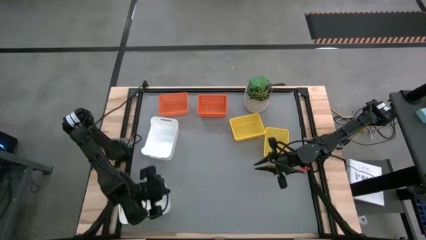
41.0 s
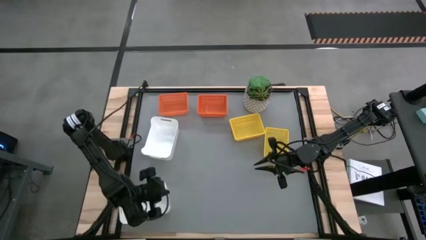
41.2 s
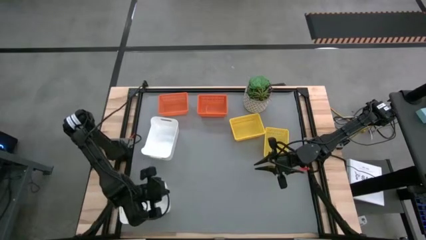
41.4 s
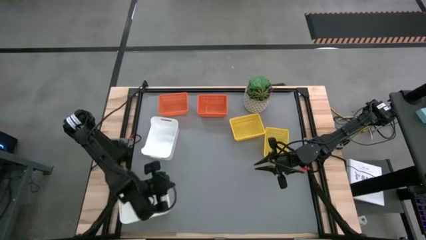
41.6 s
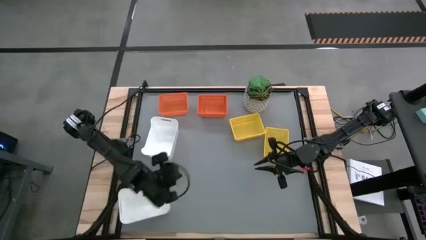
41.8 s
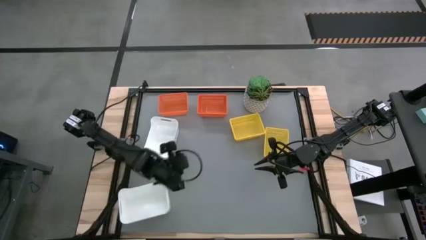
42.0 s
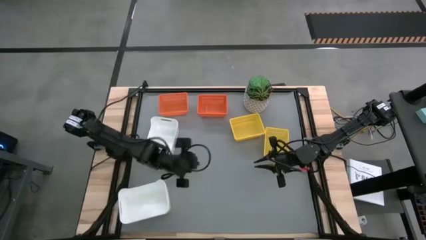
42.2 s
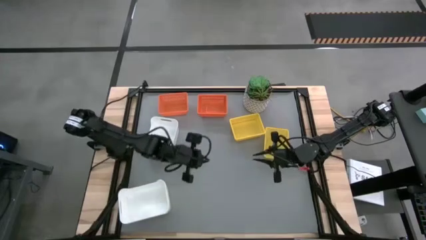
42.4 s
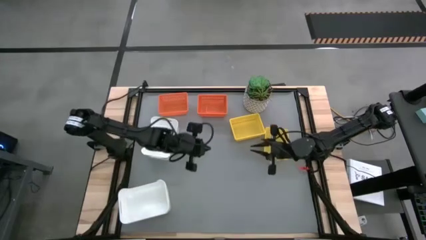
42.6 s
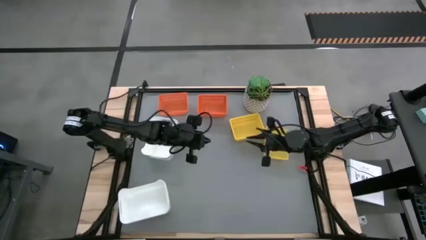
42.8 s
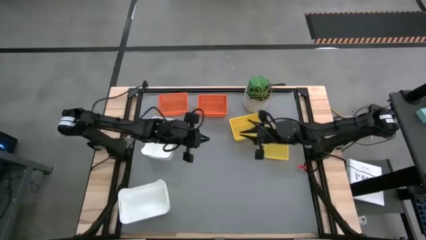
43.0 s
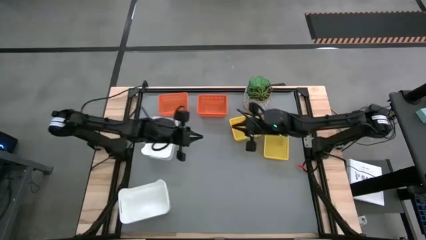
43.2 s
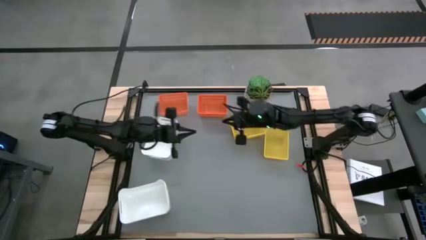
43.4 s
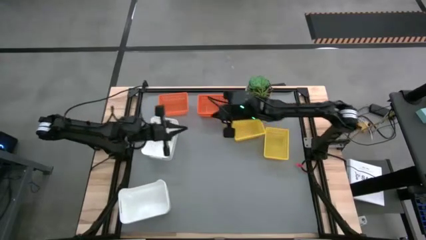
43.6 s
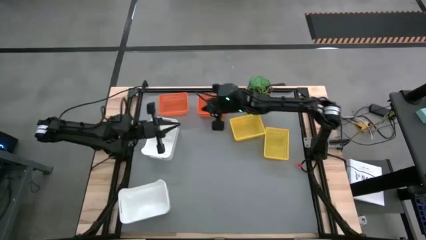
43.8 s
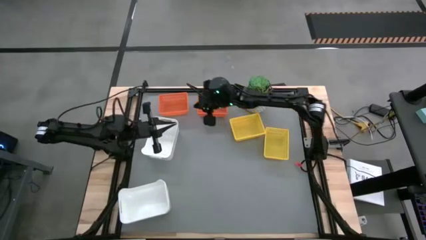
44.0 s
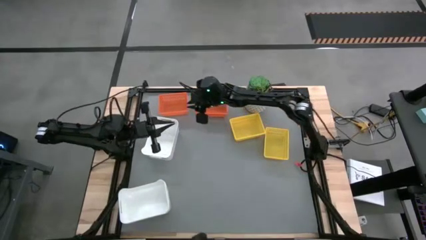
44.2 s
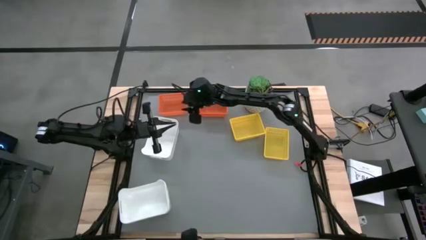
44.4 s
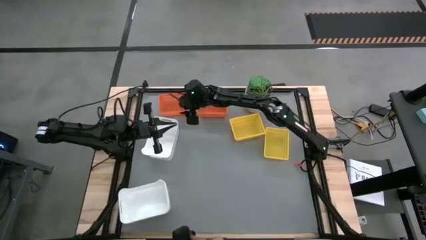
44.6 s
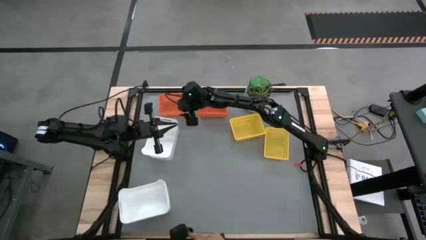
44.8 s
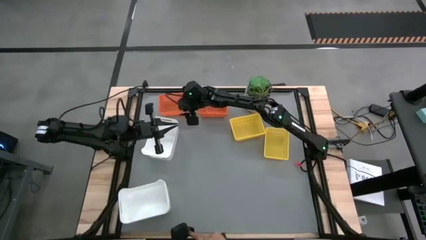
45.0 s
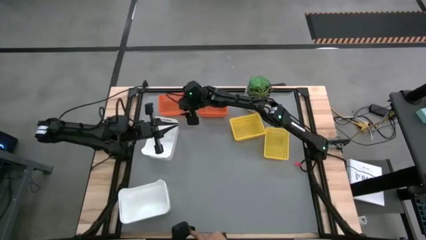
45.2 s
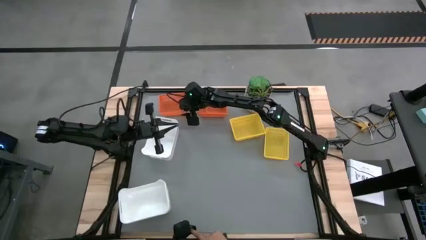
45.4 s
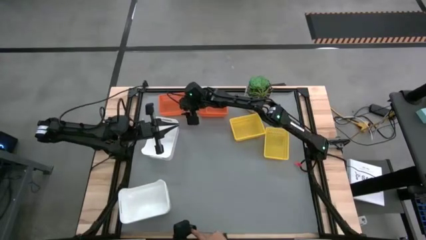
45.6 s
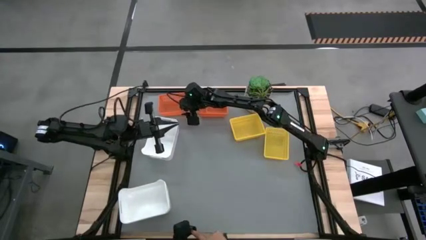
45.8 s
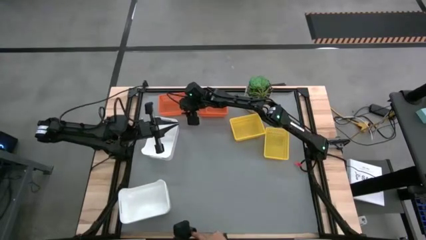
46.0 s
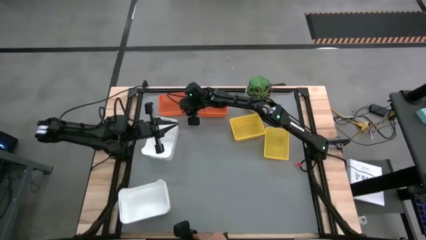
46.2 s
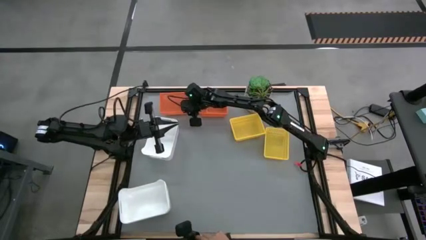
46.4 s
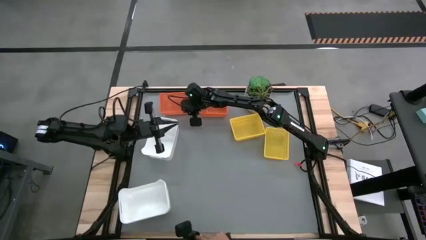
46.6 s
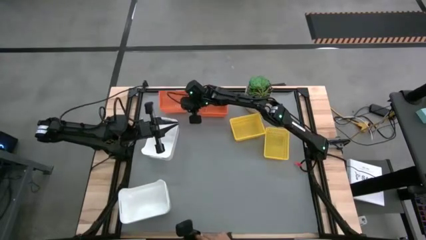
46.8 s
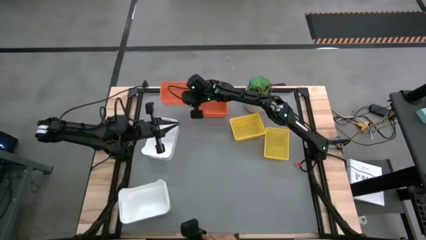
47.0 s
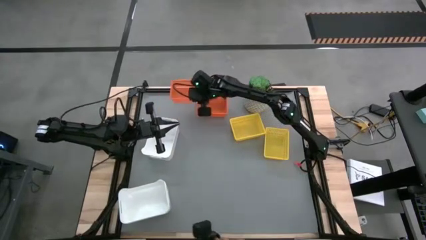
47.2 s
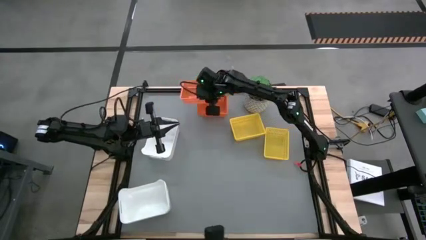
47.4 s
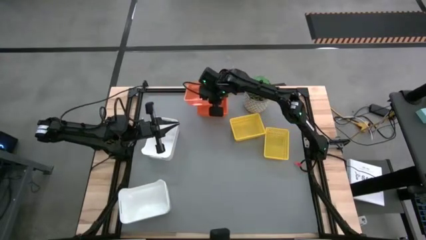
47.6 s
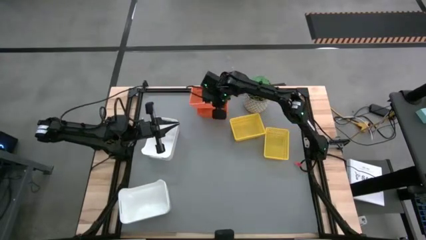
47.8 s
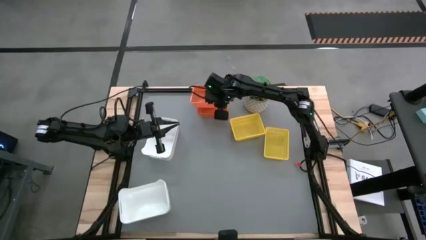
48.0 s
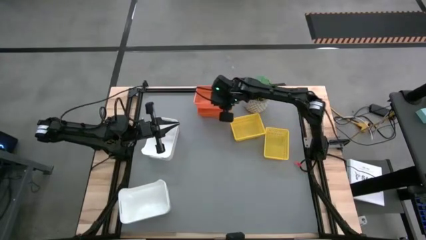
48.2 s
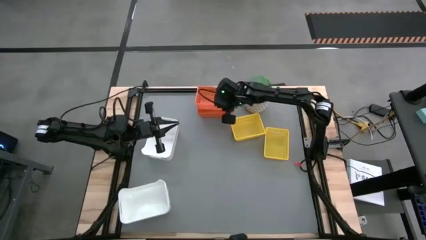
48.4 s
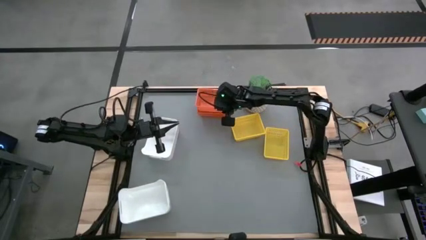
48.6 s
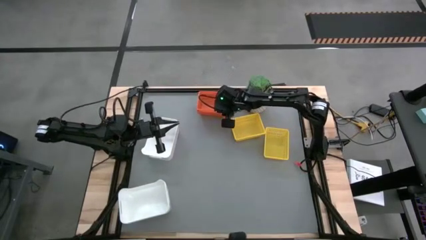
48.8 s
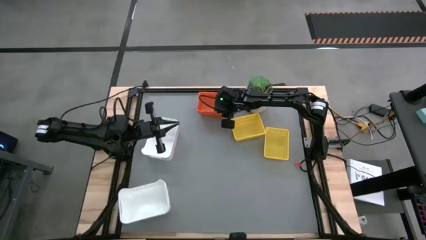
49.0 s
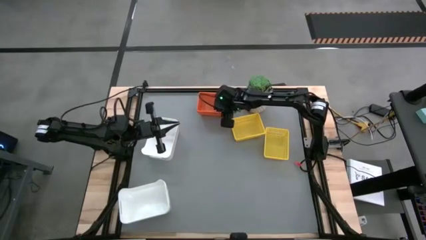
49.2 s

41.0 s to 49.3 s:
Stack the left orange bin on top of the right orange bins

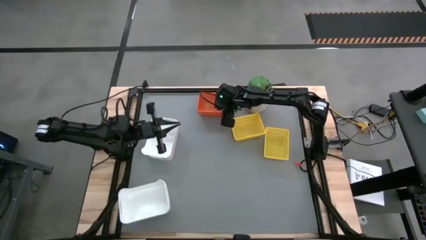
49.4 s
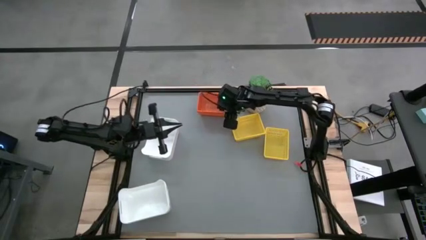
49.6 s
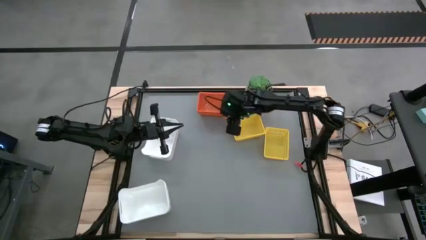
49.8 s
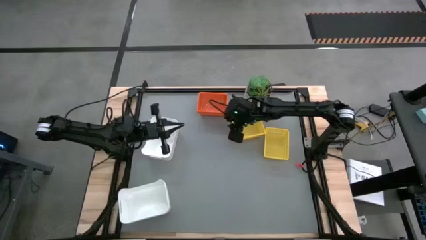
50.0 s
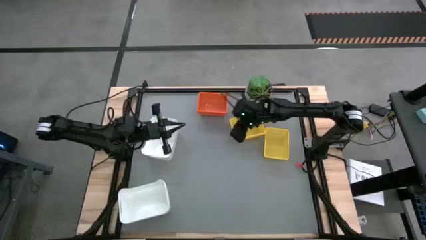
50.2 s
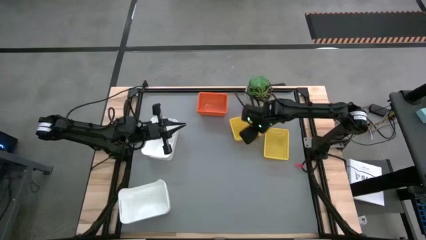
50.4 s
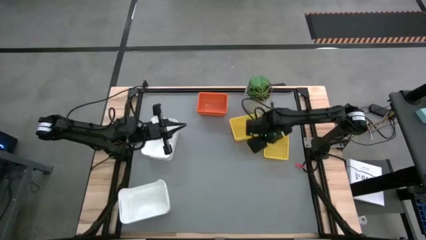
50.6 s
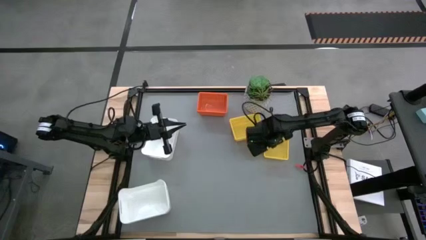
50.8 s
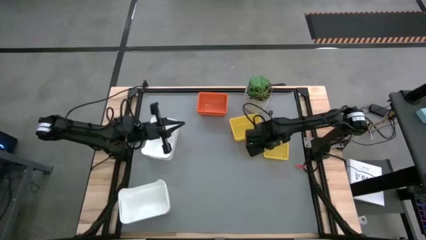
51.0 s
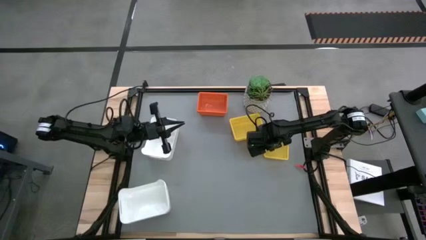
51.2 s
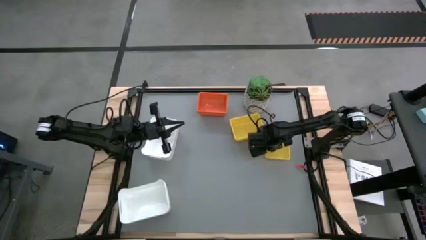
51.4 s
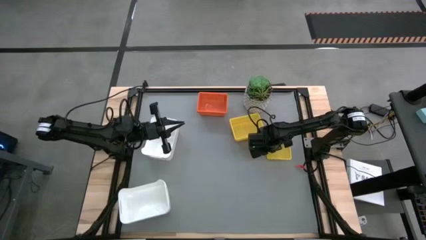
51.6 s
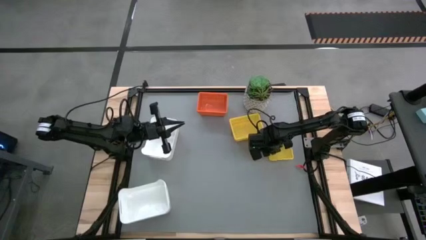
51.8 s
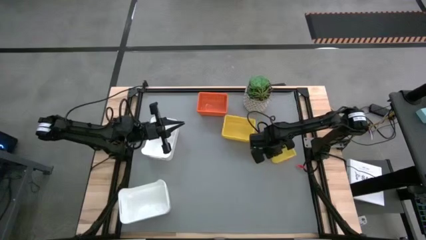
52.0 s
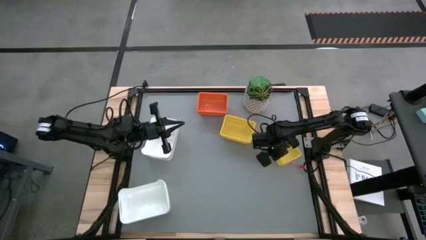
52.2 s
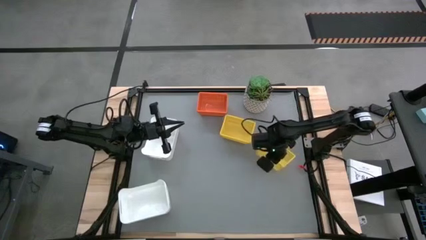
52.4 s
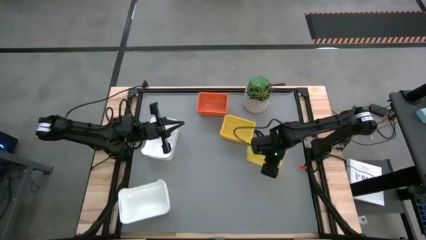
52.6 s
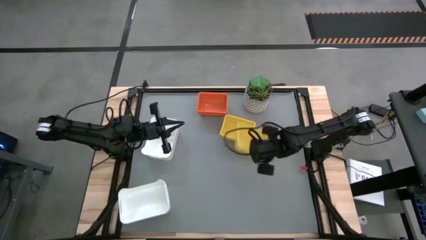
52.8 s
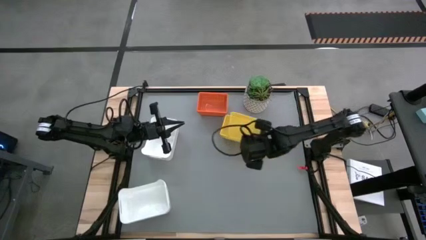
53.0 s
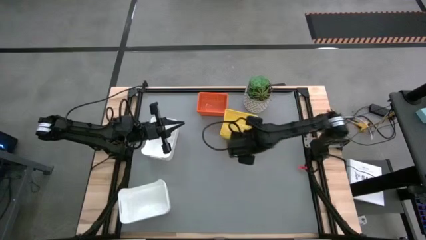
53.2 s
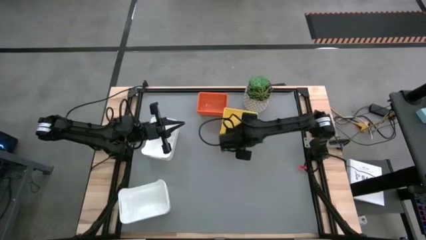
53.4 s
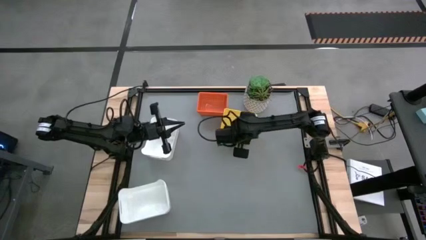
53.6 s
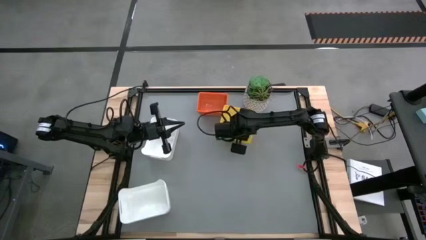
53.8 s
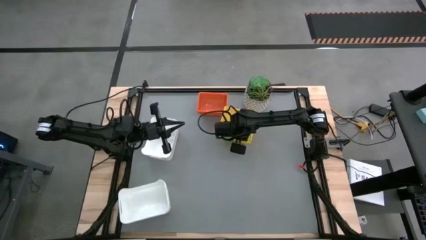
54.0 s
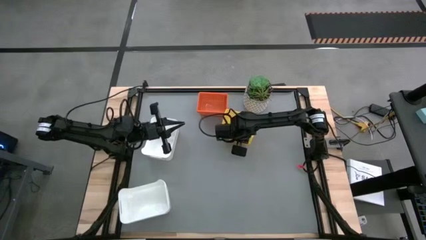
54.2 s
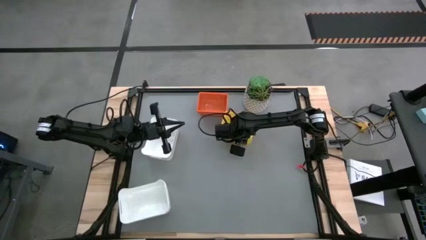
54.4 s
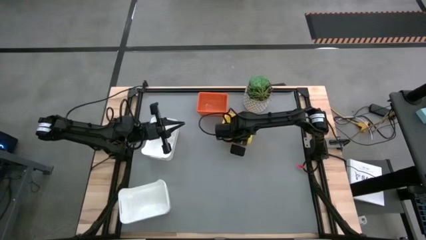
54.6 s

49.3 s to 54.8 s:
Stack the bottom yellow bin on top of the top yellow bins
